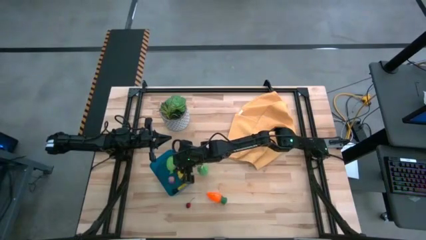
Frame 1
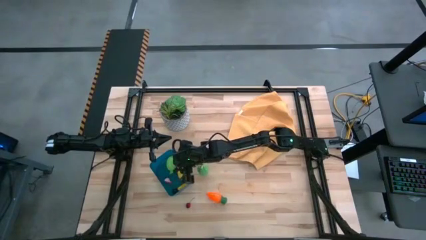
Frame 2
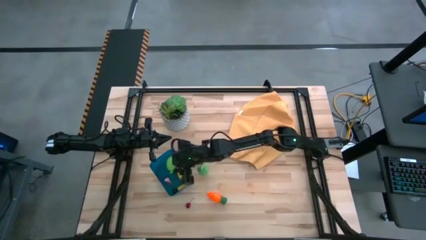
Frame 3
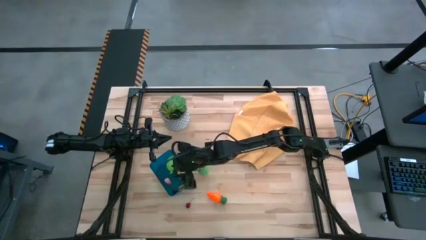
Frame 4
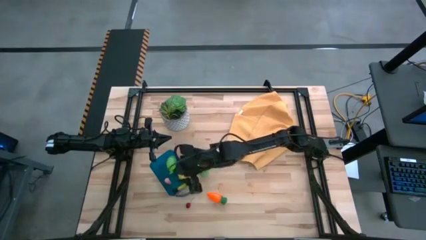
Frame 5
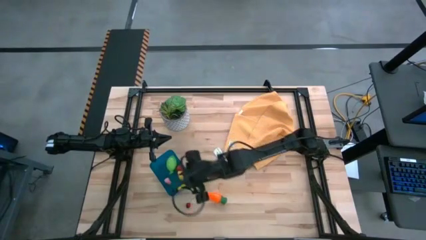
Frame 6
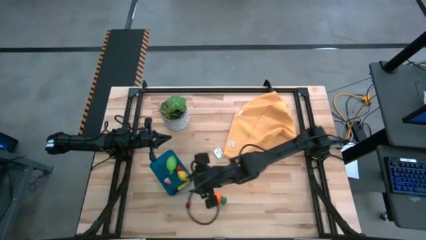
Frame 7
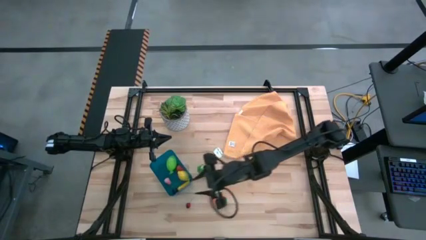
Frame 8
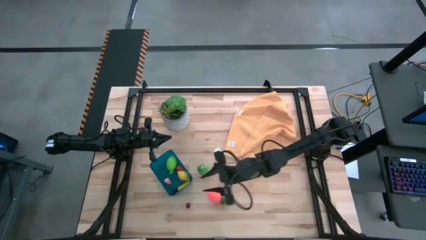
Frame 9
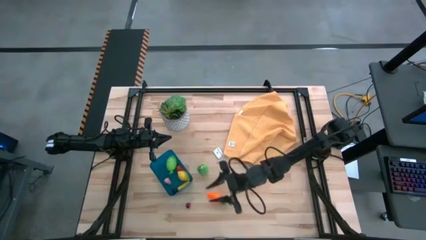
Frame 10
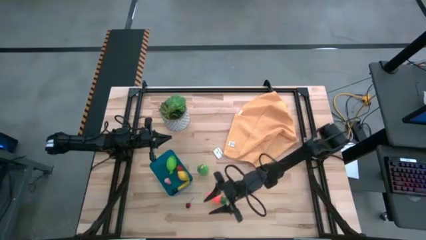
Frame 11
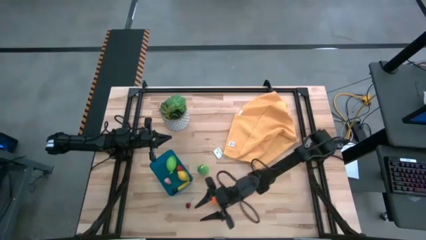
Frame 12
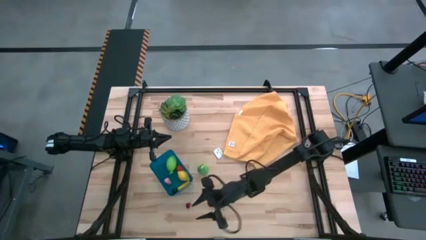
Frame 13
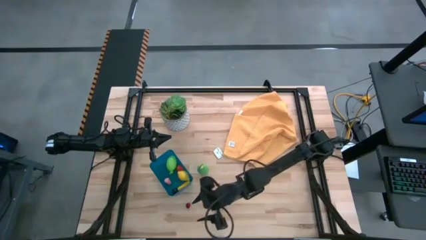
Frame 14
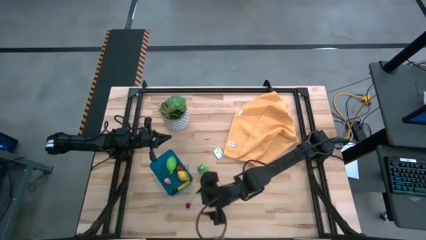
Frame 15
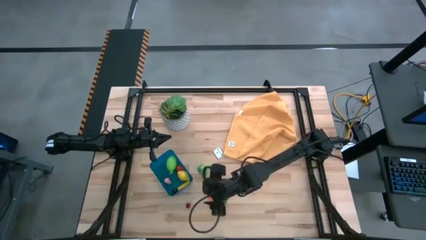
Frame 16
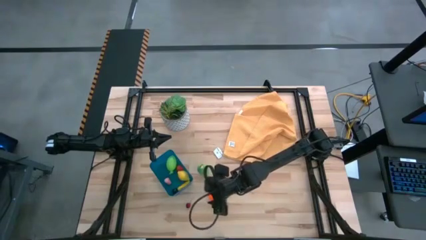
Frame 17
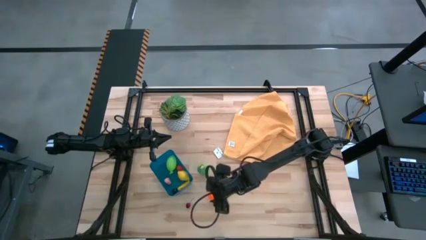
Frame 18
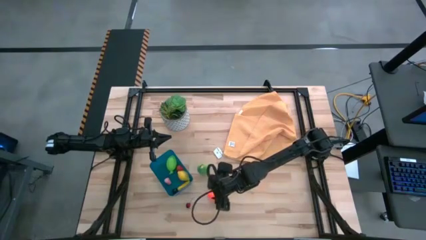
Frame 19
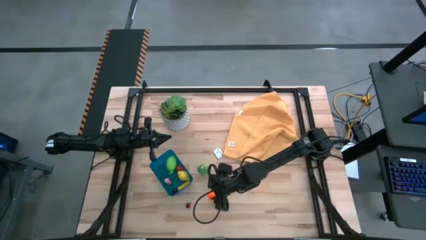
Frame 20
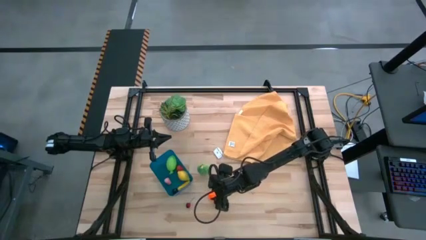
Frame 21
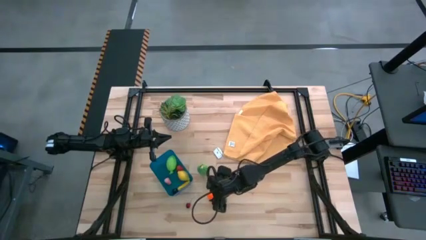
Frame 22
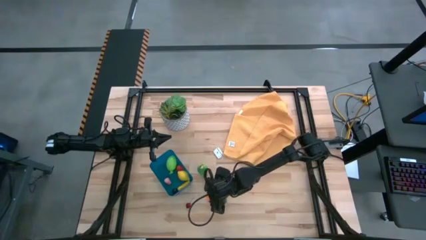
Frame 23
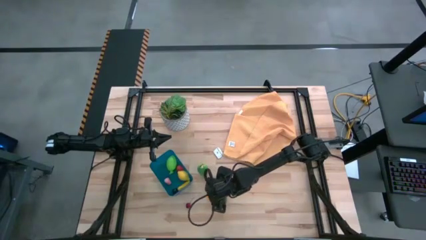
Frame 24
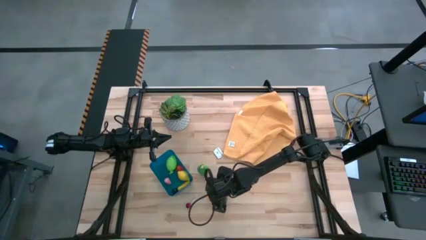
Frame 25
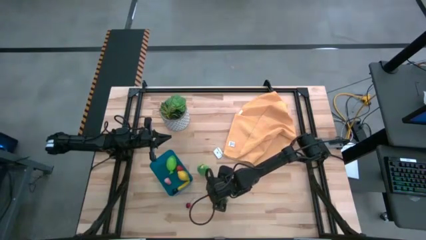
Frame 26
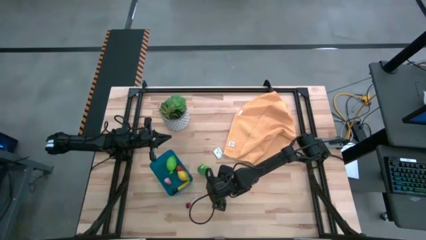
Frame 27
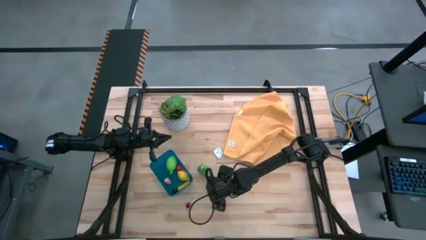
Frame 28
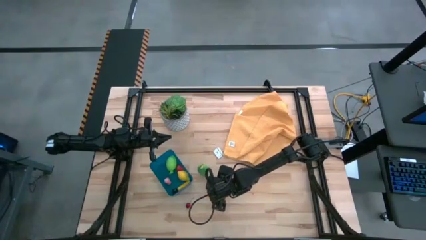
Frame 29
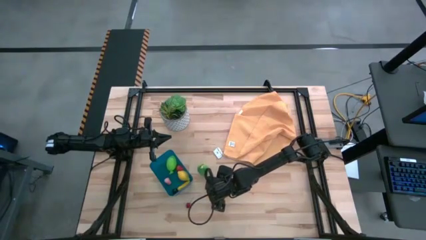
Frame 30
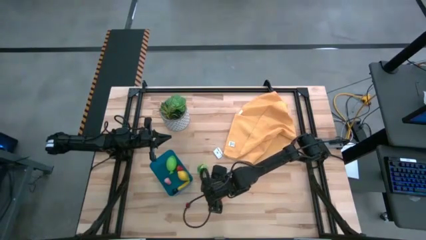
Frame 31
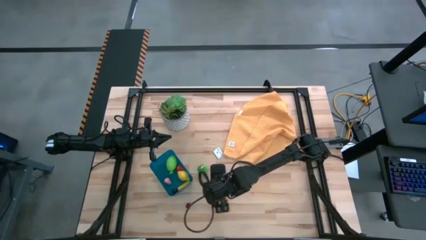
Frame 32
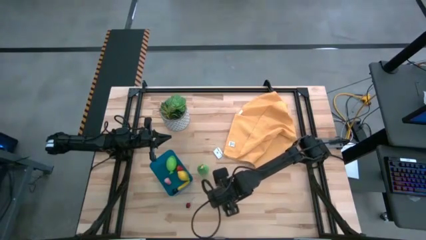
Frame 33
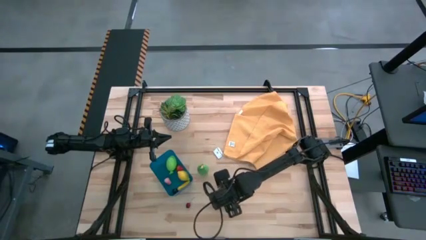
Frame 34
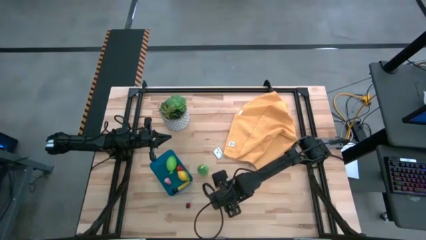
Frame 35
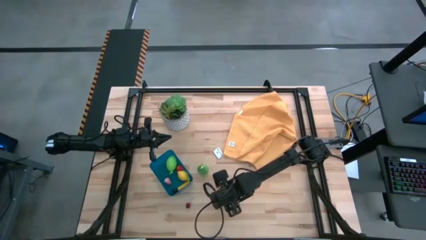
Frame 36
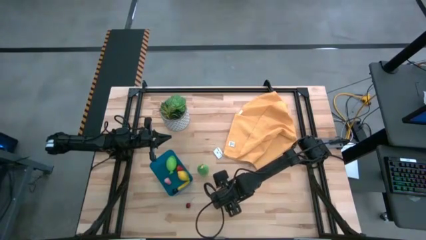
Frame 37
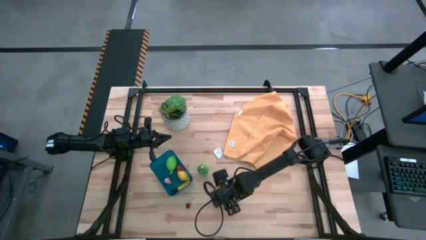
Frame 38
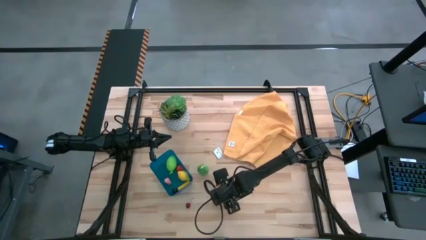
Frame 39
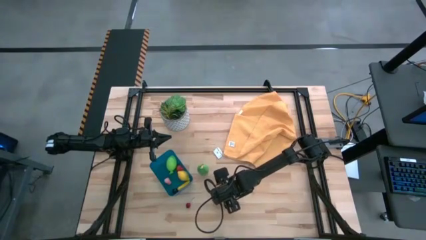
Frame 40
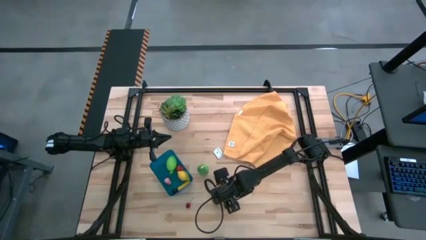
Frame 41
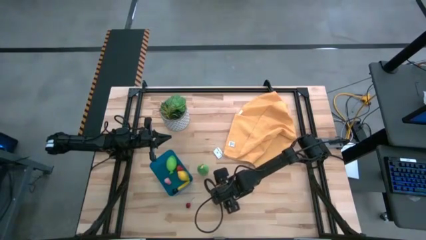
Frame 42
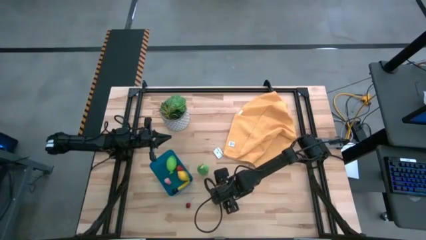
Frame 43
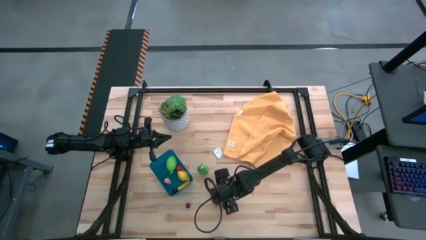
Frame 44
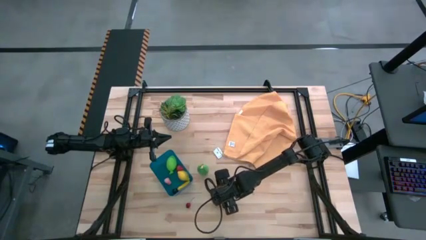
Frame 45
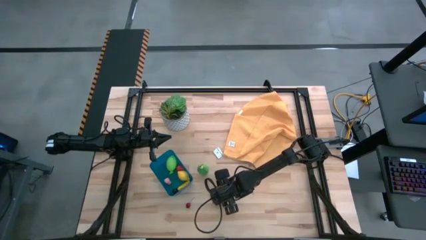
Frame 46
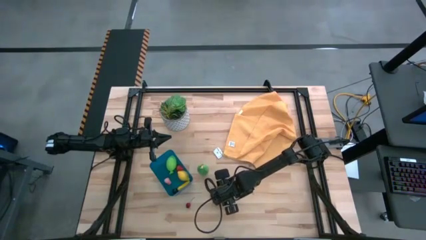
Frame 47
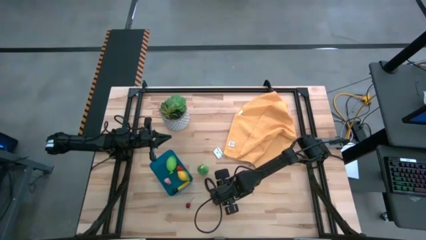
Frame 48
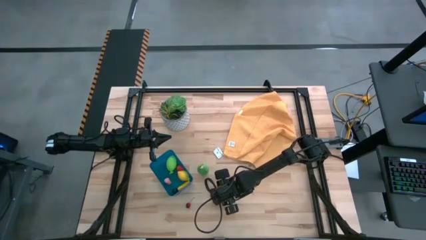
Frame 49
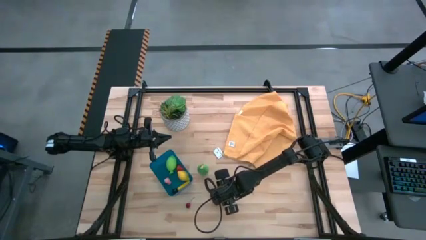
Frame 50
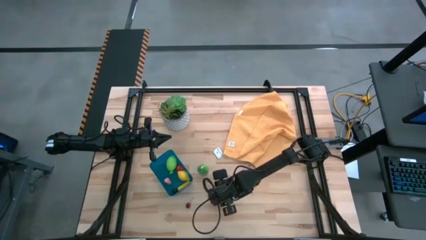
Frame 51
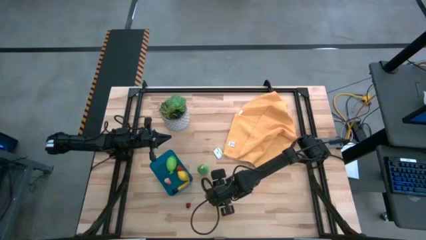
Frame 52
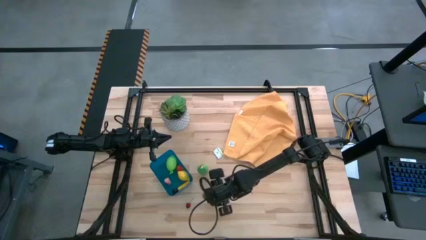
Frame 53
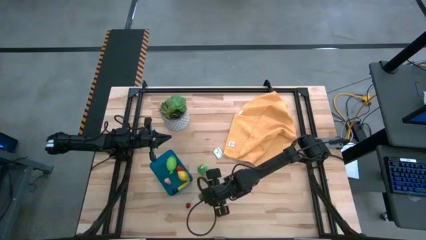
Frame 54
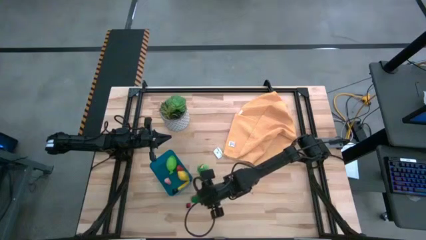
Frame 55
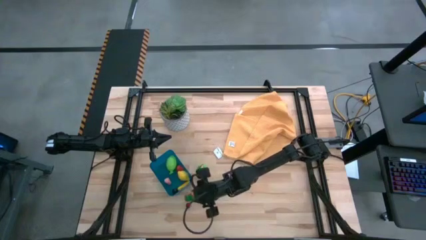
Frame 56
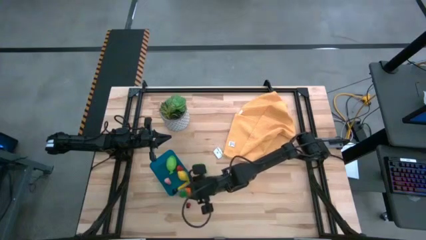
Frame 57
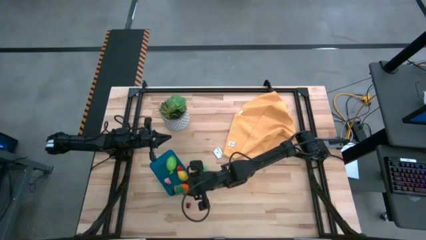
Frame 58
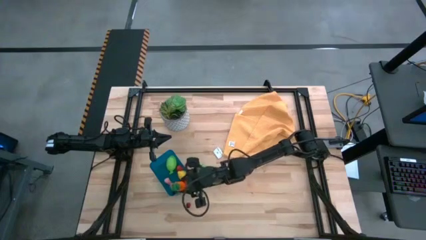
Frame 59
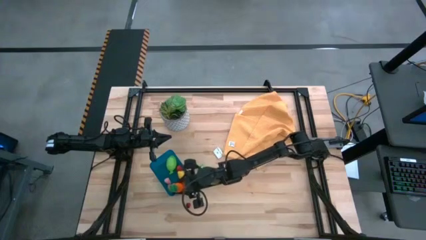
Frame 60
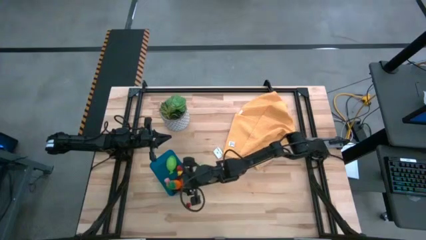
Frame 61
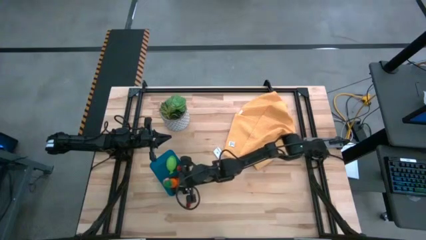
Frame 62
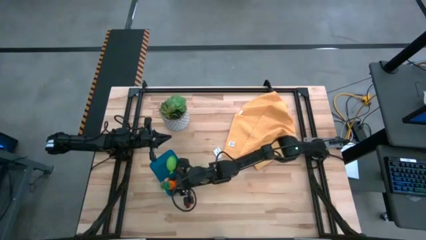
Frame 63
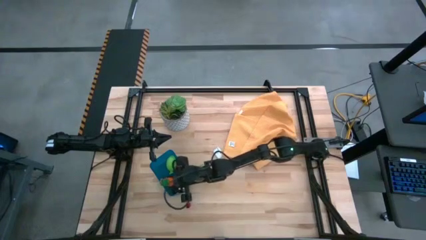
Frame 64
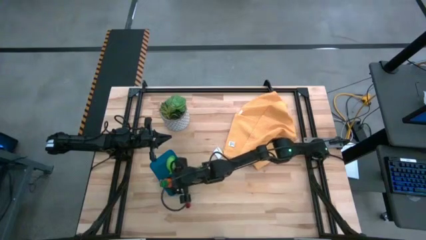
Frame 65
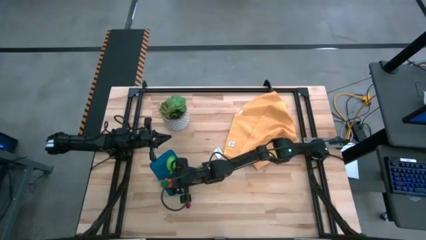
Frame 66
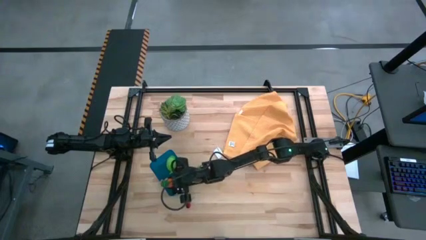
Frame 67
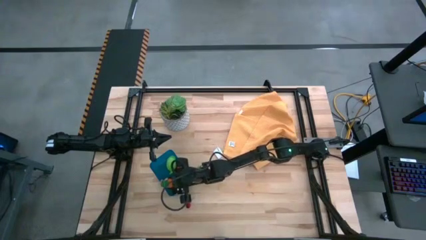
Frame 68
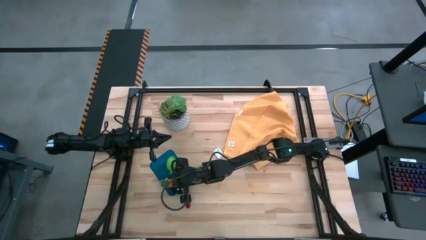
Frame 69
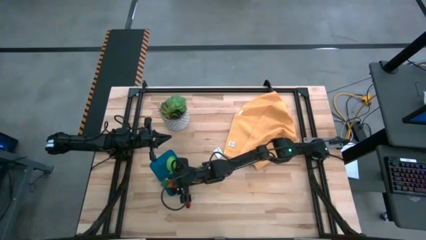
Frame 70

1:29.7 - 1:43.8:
Task: Pick and placing Produce into tupperware
Put the orange carrot into the blue bin

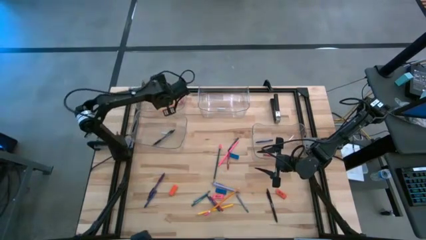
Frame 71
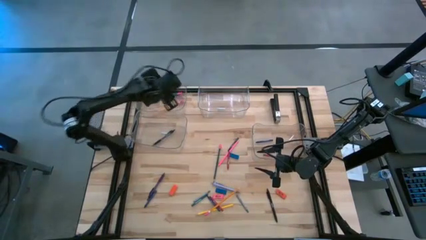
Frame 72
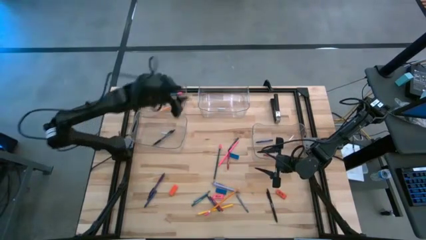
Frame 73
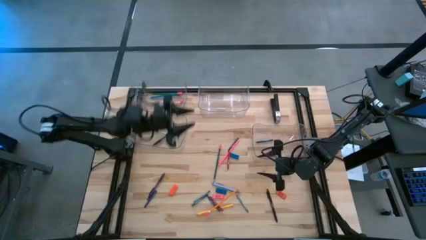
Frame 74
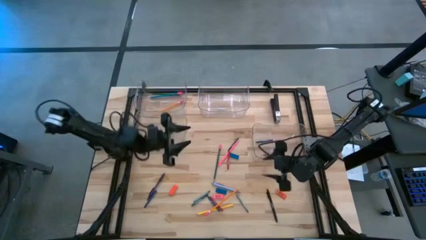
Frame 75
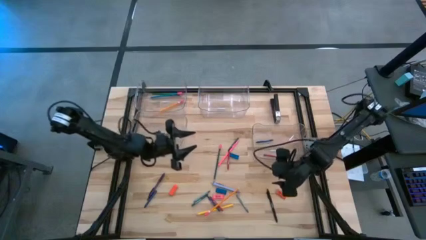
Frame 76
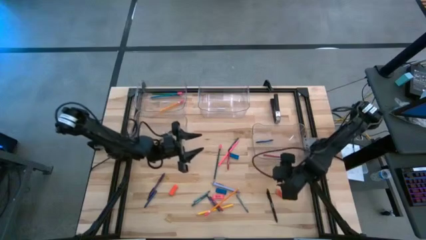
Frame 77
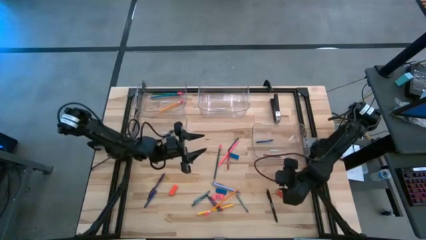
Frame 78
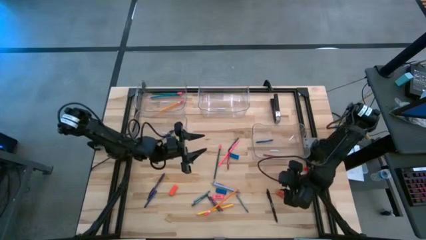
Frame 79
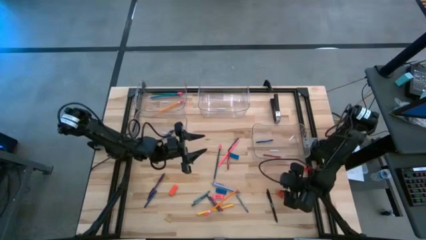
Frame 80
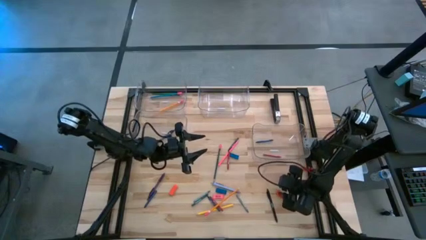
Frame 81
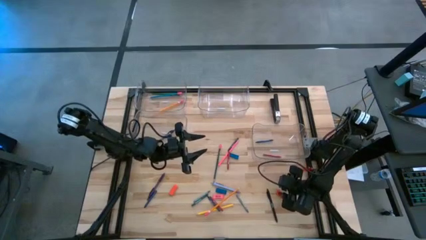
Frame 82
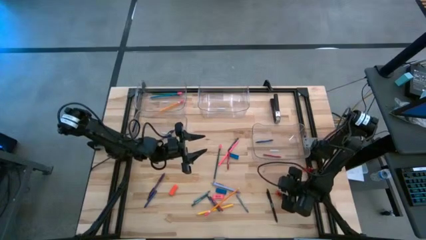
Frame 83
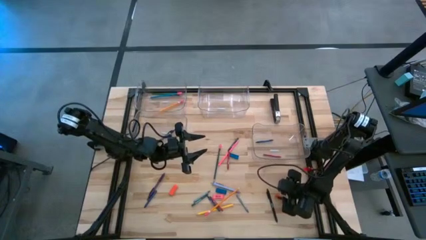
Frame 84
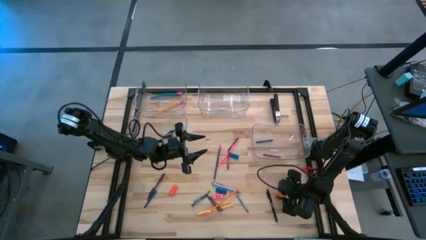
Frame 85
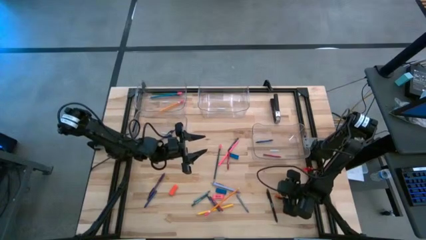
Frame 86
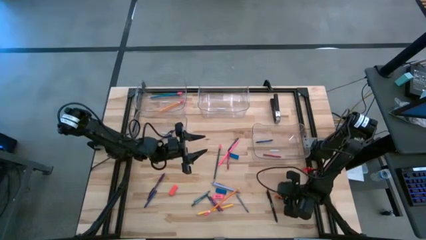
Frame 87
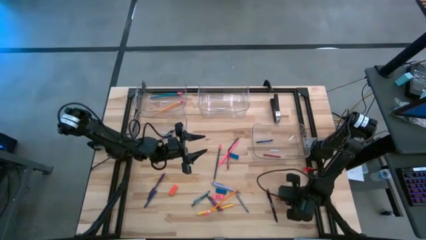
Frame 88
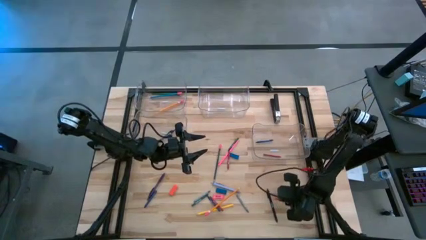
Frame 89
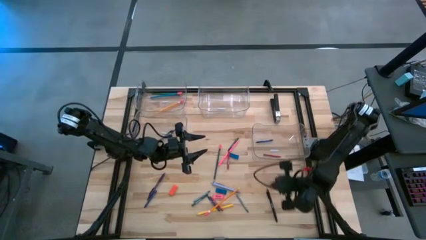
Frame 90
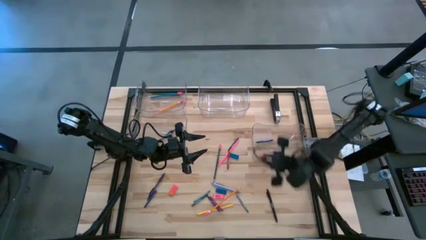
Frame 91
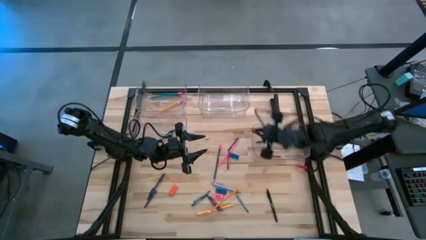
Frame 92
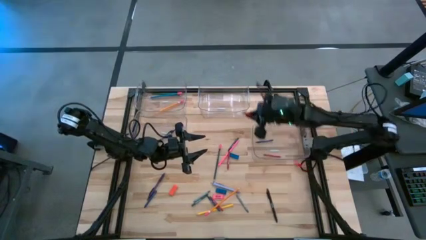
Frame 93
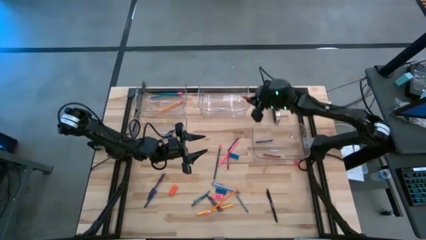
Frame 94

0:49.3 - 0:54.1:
Task: Sort crayons/erasers/pens/pencils in bins
Put the orange eraser into the top right transparent bin
